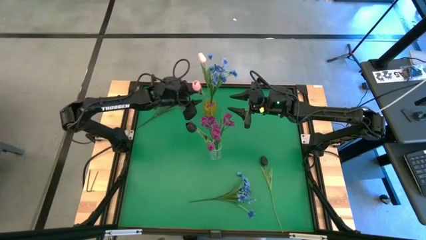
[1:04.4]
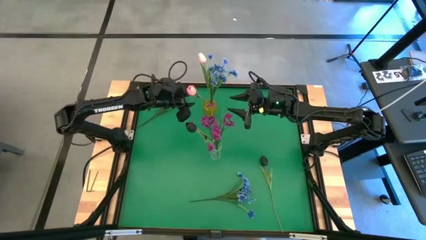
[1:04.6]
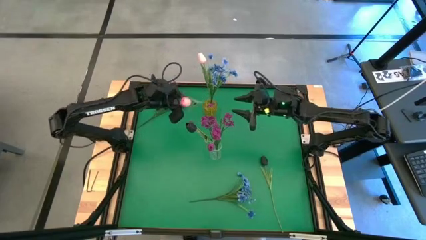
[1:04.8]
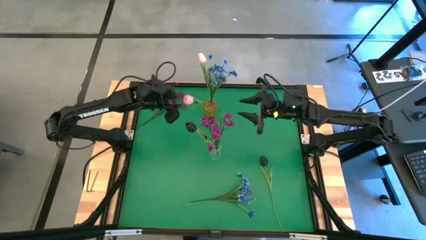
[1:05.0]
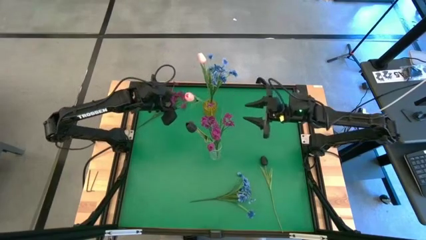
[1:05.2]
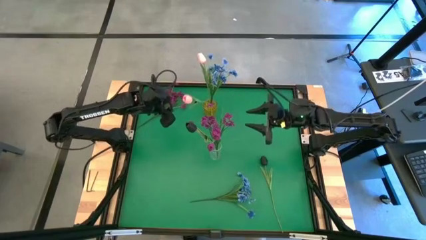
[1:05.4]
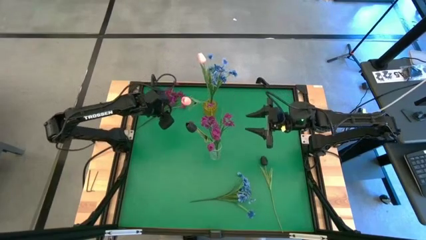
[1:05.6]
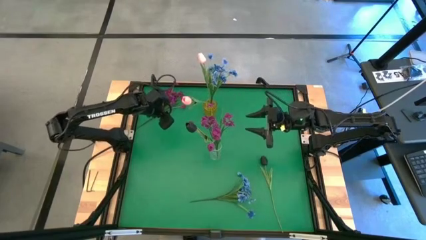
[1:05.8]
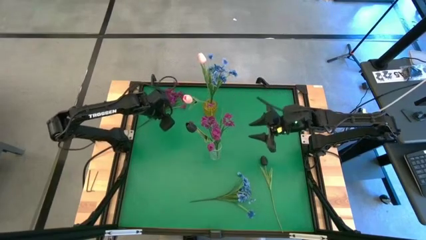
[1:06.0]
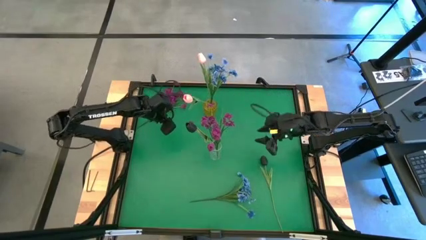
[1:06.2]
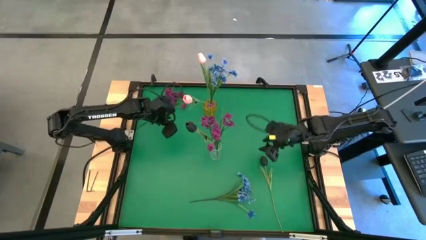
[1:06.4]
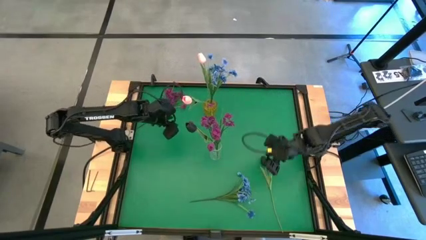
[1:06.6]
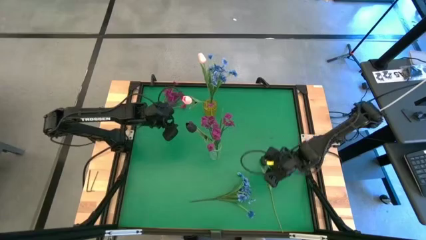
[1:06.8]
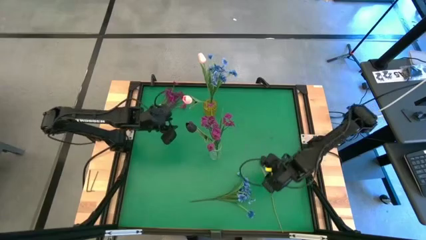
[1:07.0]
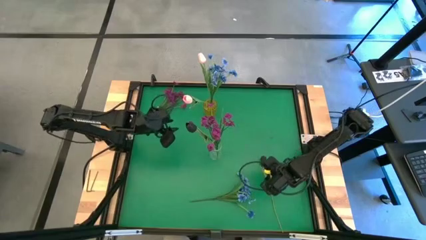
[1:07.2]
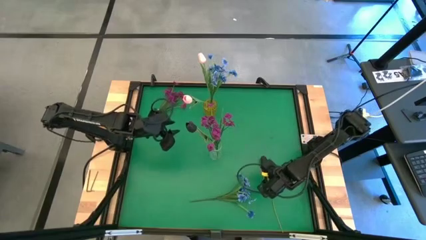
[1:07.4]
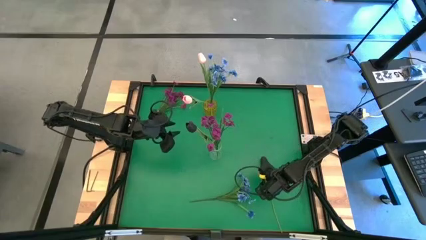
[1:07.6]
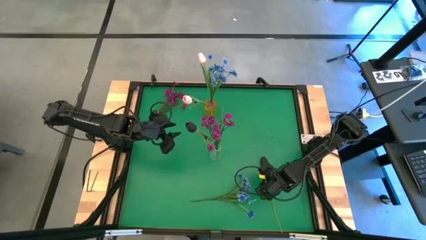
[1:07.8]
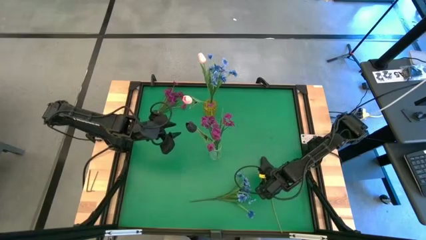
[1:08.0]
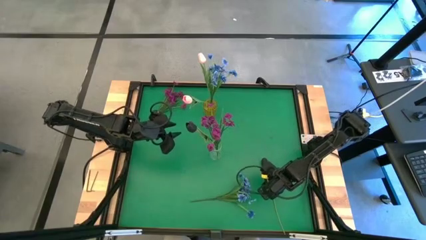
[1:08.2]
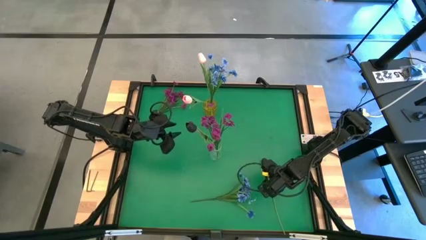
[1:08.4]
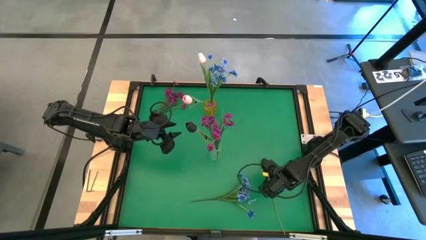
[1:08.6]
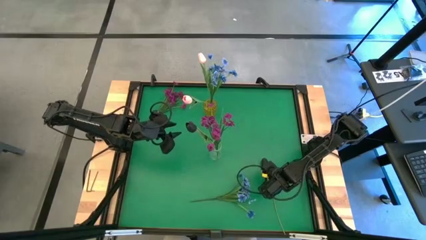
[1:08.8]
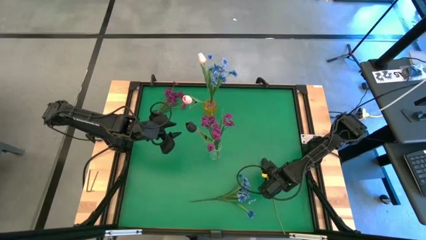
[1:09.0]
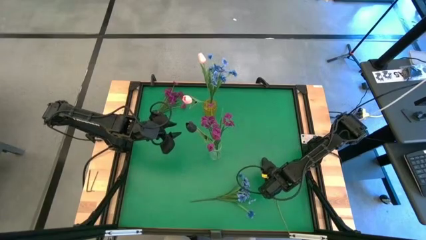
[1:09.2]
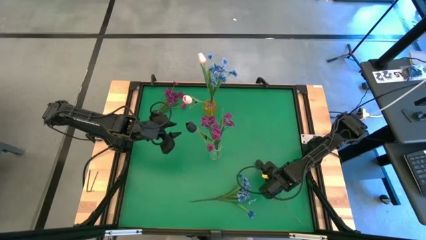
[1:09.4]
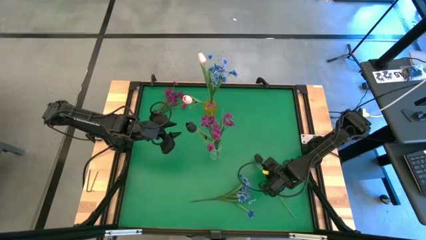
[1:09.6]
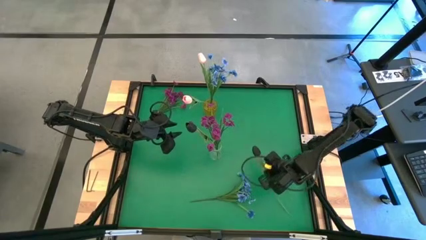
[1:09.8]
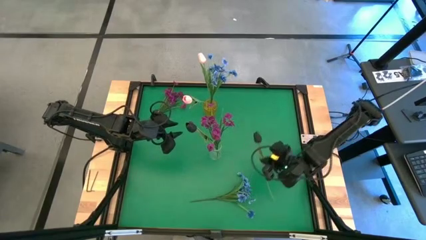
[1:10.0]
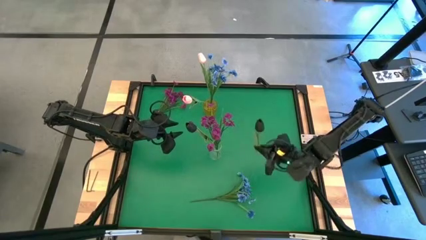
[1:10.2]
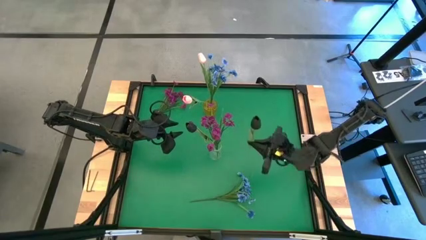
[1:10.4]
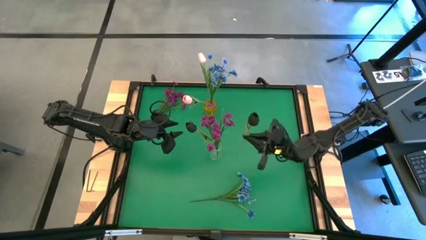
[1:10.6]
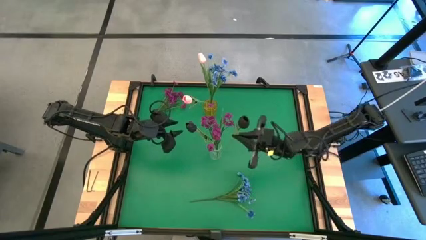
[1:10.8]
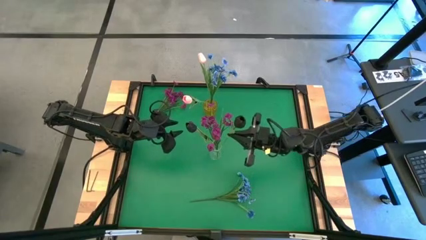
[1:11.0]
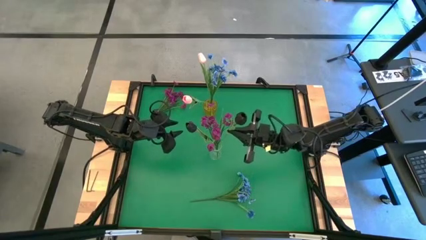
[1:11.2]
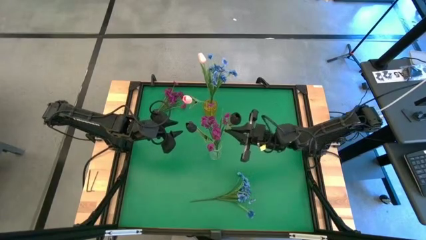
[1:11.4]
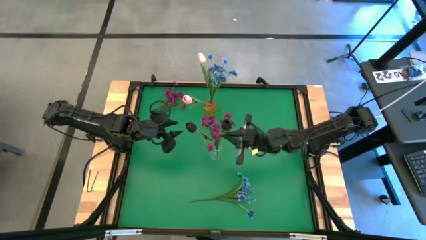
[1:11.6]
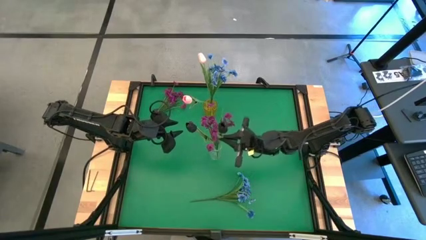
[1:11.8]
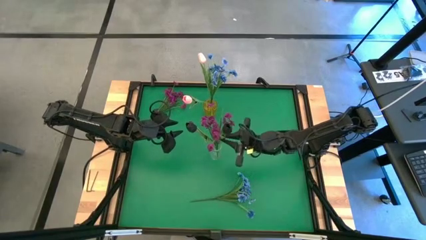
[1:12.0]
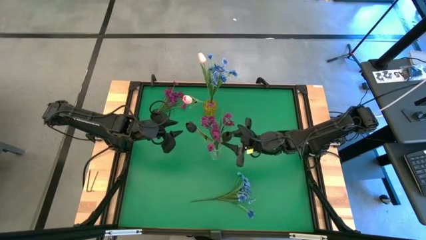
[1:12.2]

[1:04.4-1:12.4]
Task: Sort flowers into vase by color
Put the black flower into the transparent vase

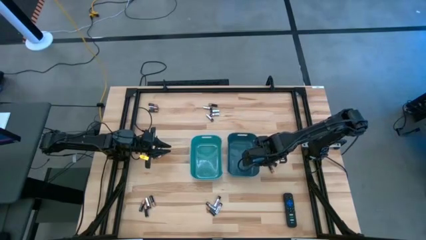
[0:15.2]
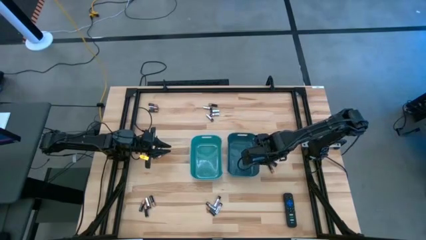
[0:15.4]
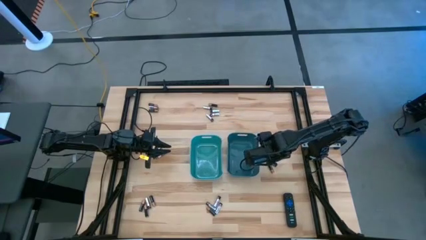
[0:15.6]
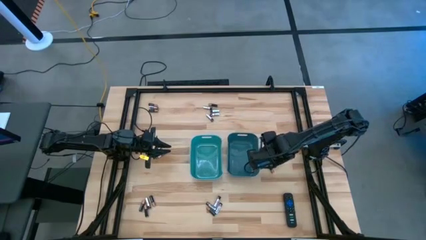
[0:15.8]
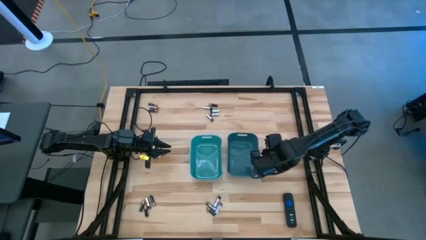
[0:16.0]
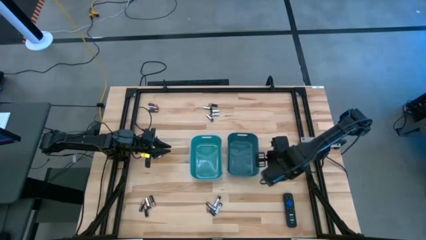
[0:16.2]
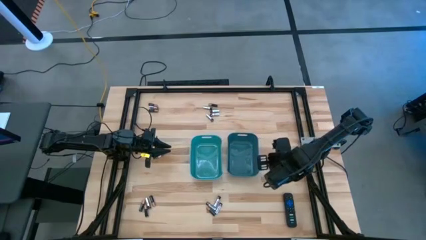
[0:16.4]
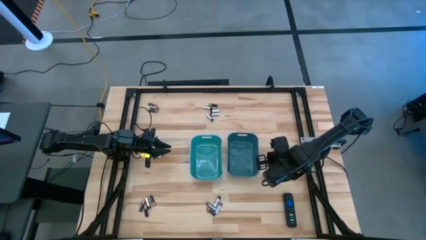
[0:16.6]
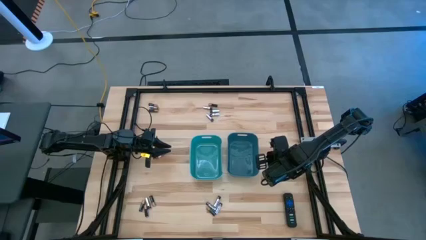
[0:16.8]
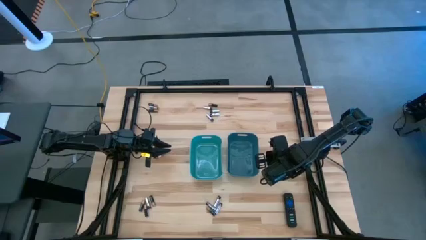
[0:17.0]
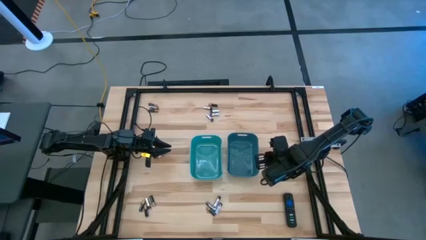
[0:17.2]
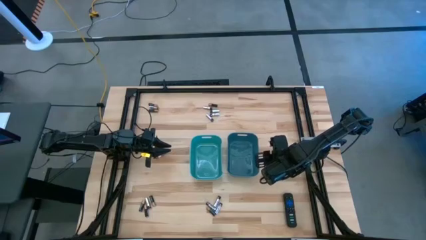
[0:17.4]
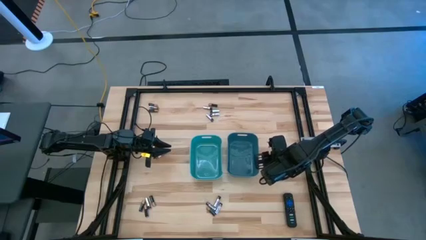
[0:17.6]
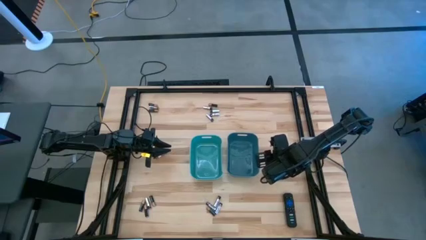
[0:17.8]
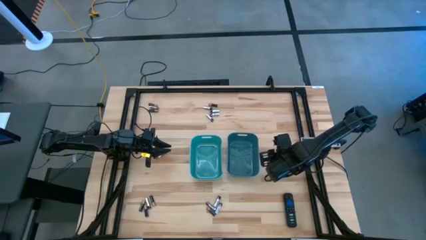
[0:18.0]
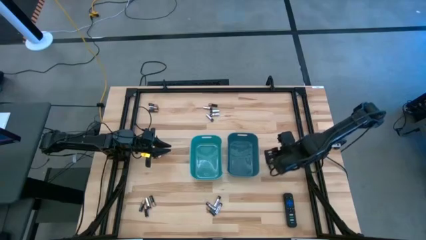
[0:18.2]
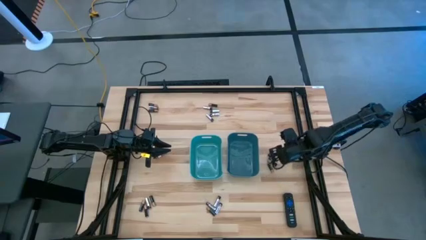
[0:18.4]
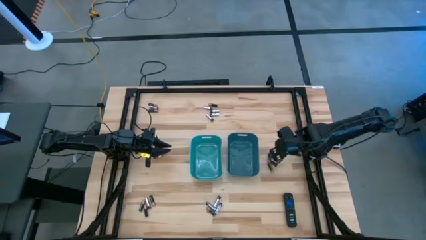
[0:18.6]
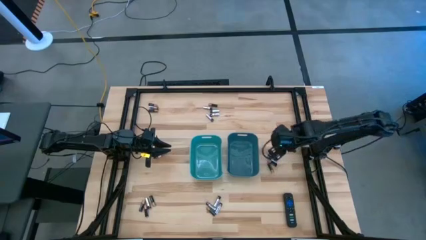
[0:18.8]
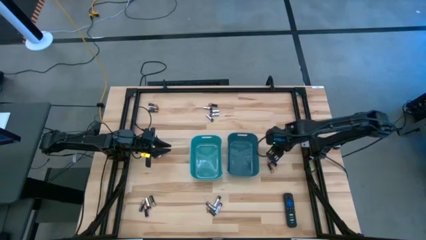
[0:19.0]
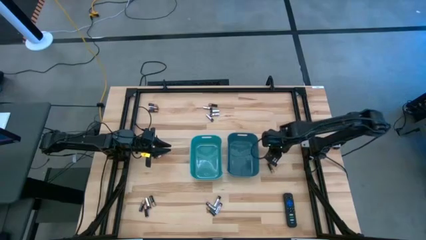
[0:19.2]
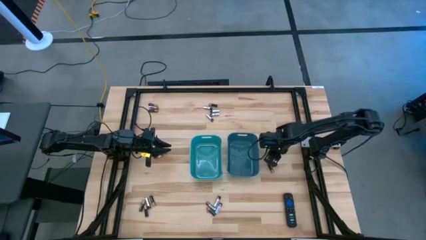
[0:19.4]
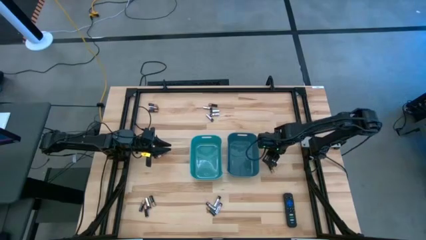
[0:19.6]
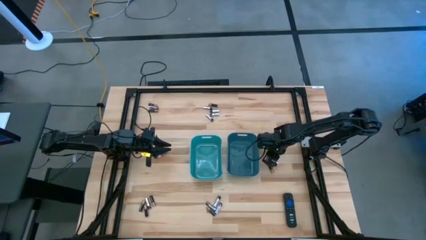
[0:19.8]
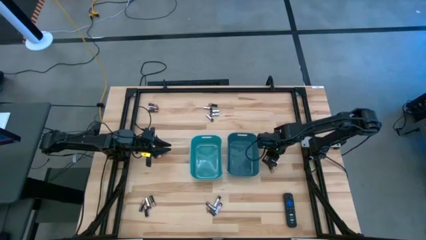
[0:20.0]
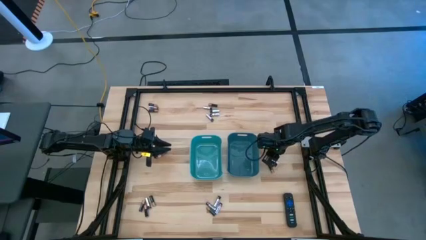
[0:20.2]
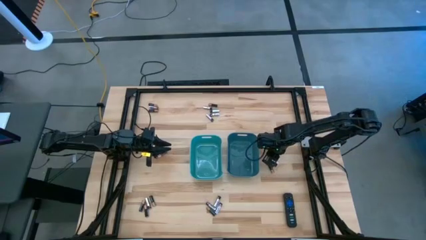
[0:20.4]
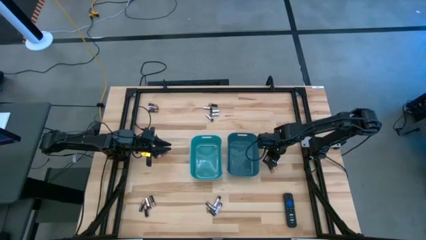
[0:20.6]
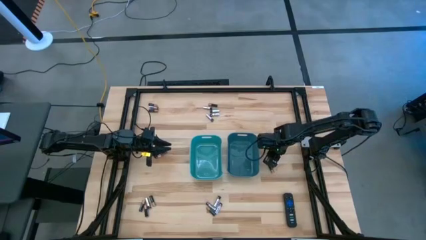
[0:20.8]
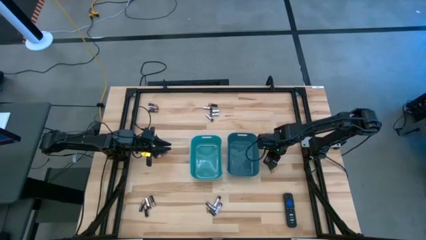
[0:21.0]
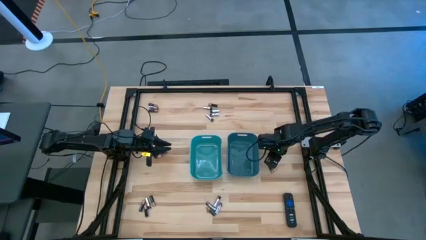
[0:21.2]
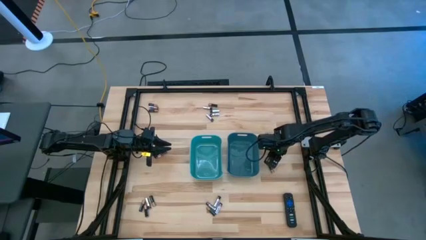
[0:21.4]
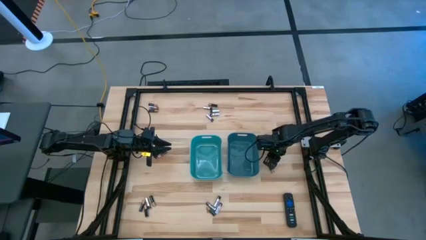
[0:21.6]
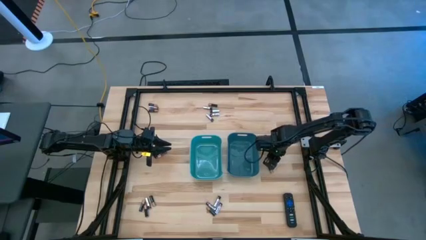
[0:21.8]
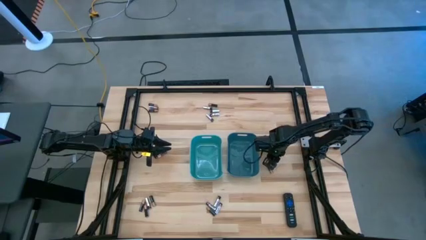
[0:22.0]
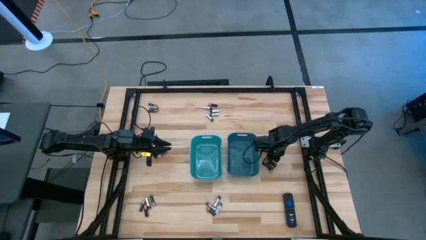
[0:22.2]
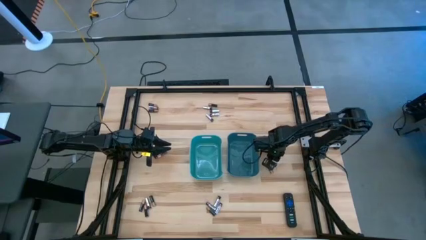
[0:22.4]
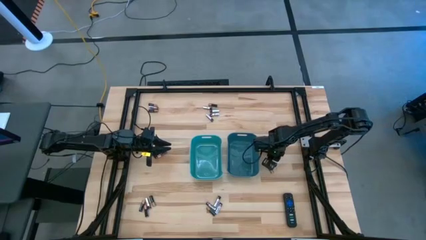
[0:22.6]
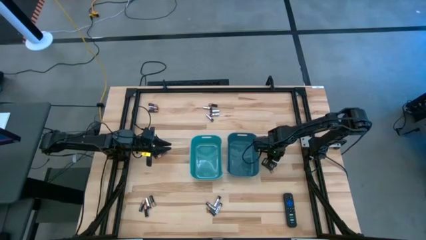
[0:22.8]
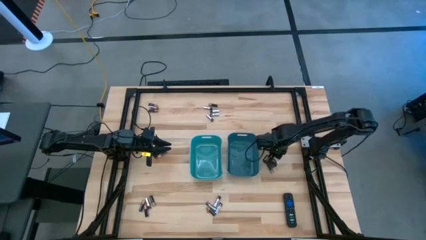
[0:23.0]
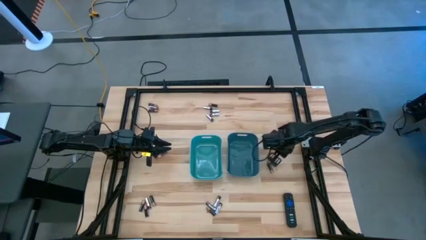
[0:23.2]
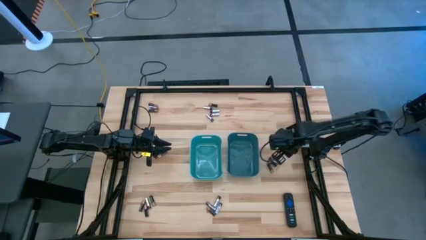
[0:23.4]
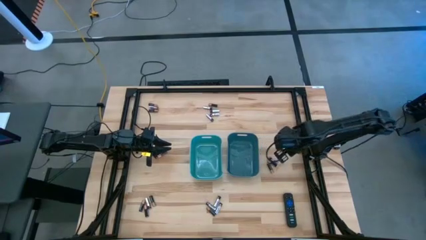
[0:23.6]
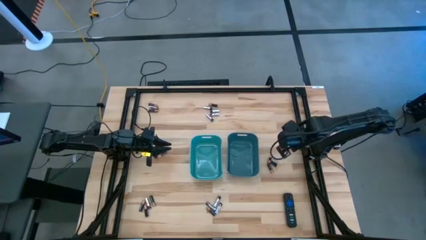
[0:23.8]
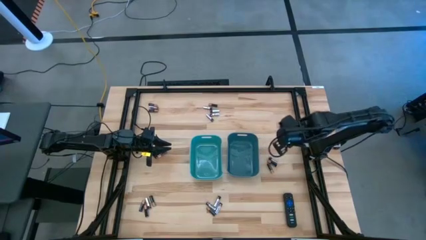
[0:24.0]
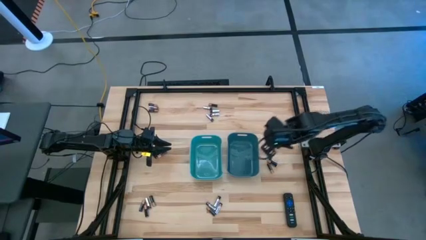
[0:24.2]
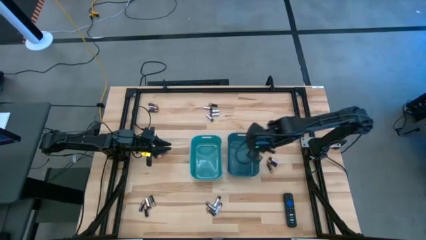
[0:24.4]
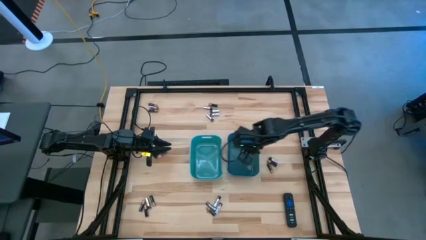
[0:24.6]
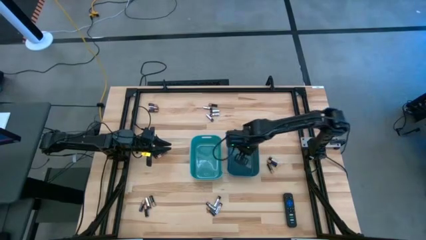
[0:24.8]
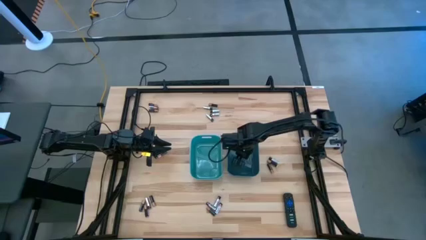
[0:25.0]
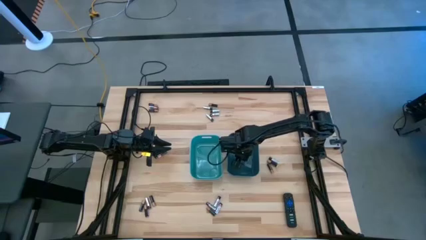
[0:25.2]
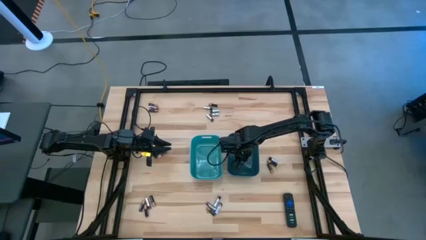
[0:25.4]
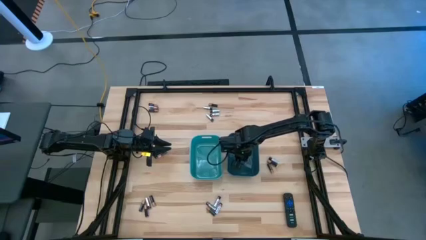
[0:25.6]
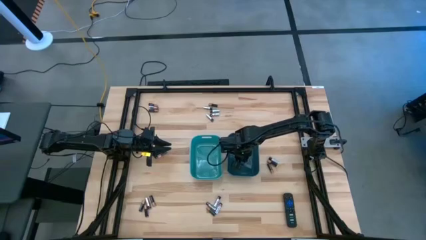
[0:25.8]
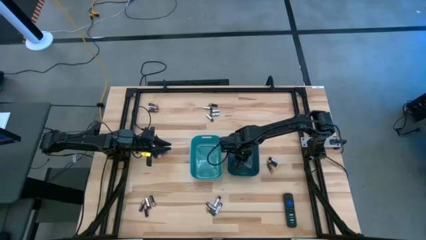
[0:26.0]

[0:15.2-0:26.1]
Task: Sort batteries
Put the black battery into the blue bin
